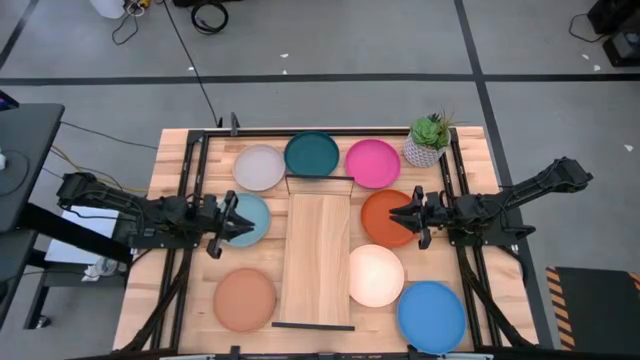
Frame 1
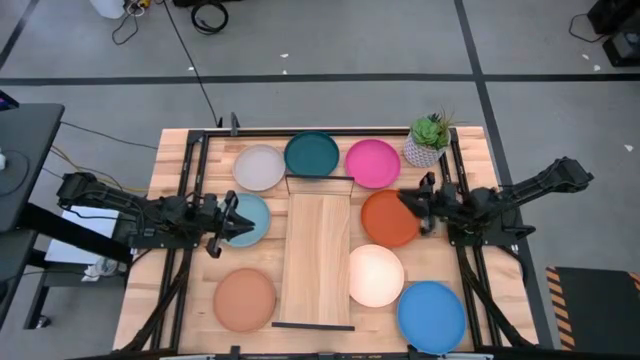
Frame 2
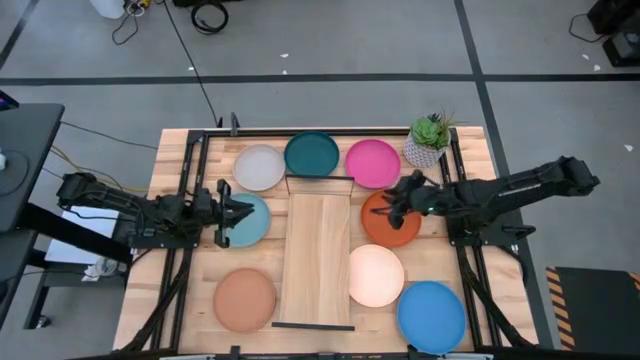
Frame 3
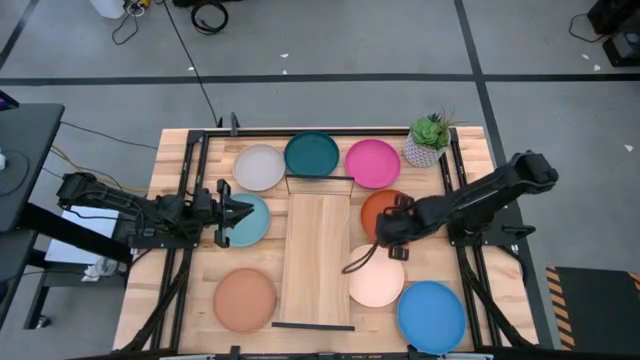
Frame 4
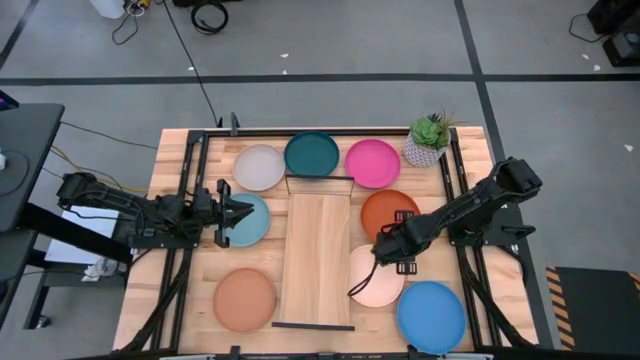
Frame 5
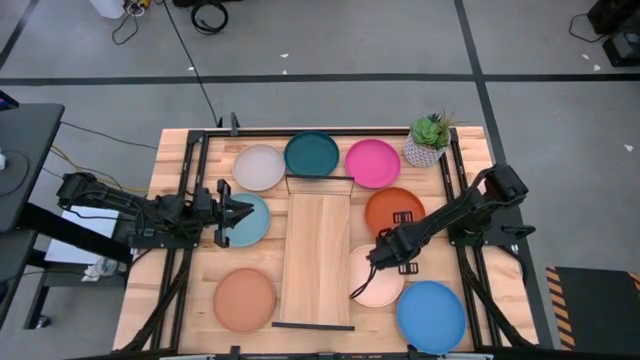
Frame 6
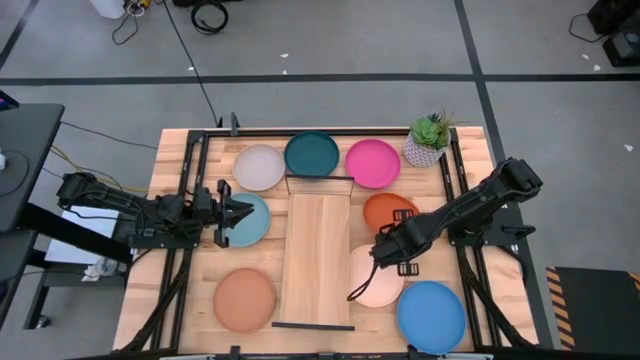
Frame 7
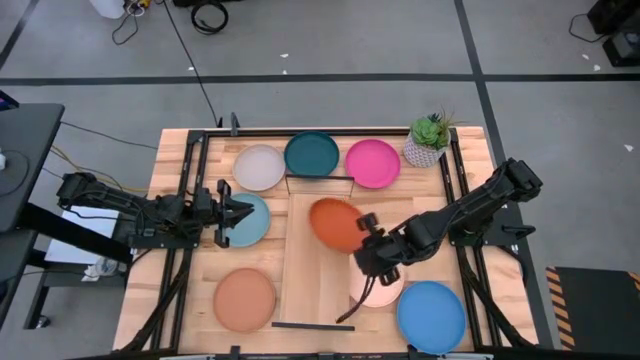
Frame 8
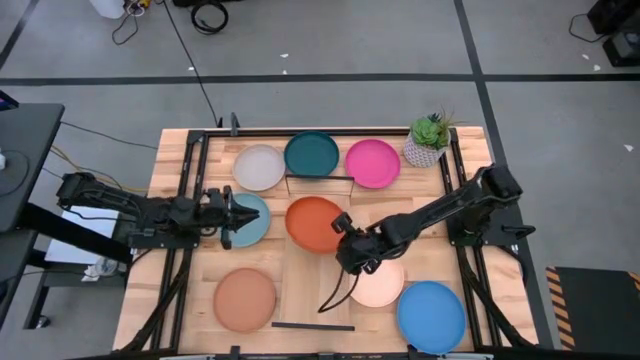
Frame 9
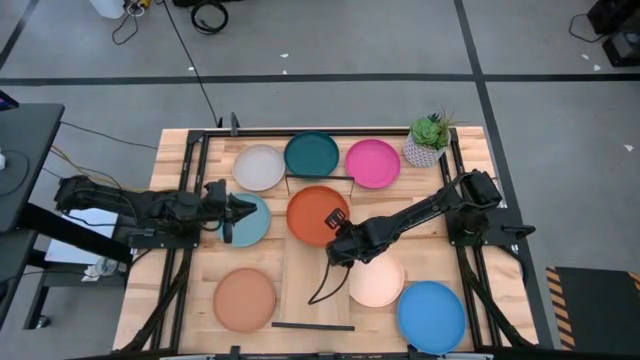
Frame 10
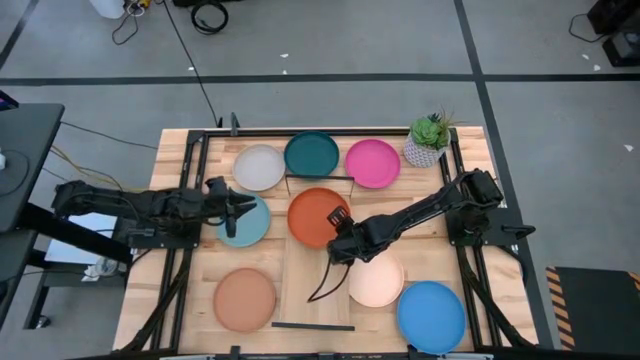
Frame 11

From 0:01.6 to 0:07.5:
Task: Place and stack plates onto a shelf
Put the orange plate on the shelf

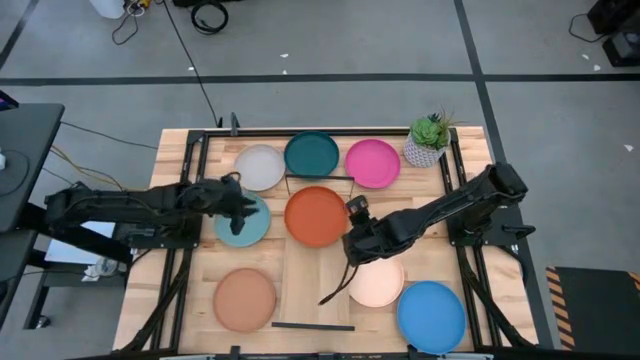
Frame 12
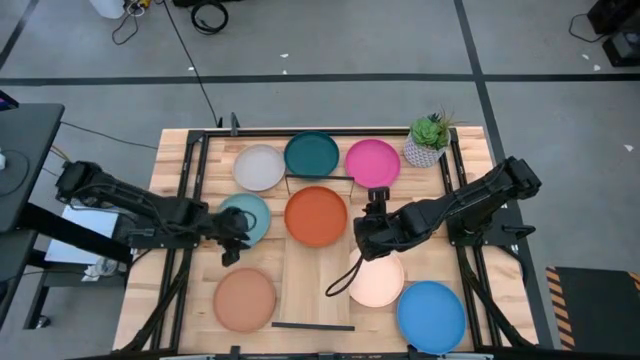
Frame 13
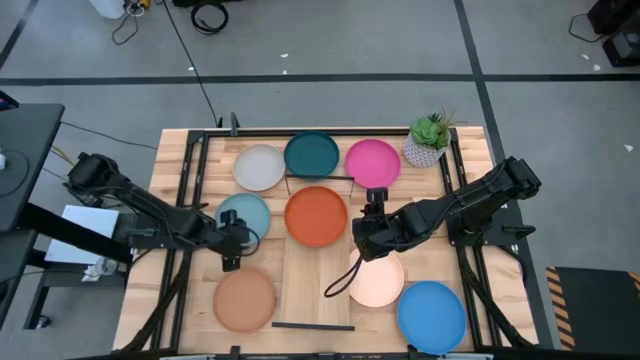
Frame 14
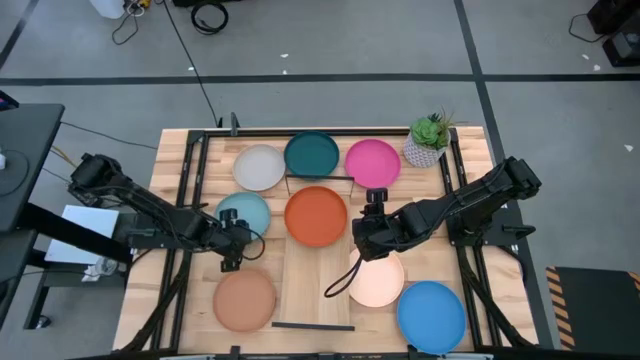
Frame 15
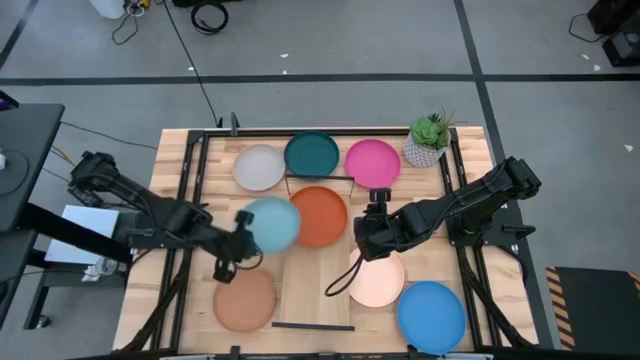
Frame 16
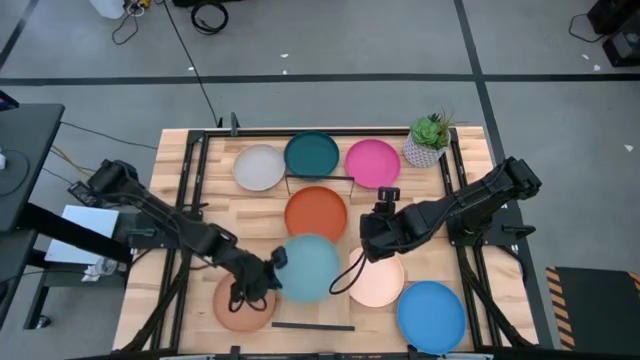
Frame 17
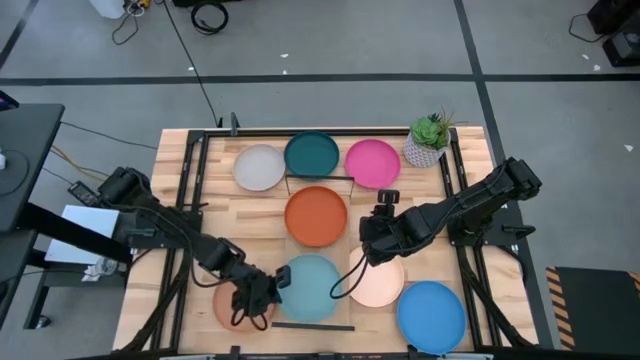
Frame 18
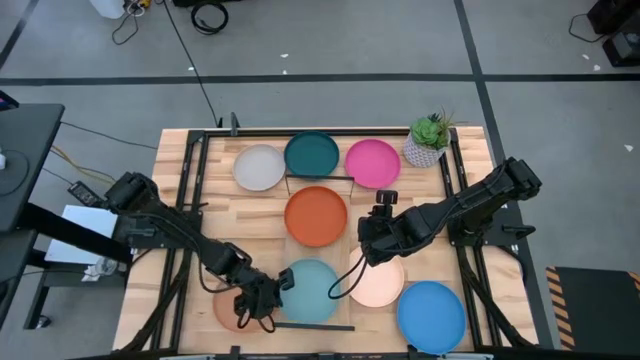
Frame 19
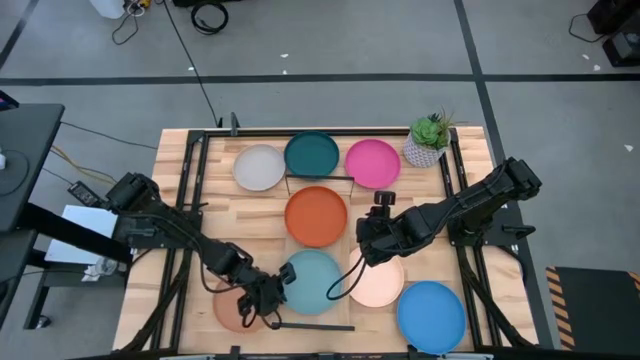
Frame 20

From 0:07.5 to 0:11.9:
Put the light blue plate on the shelf

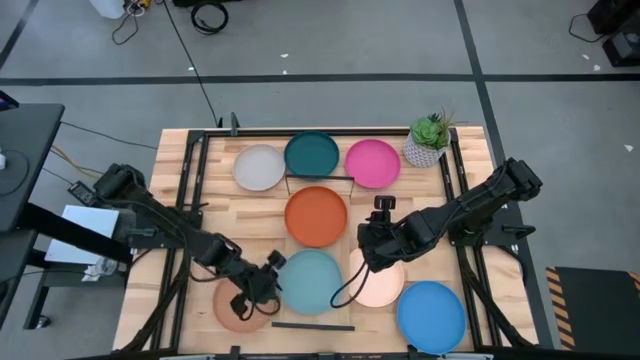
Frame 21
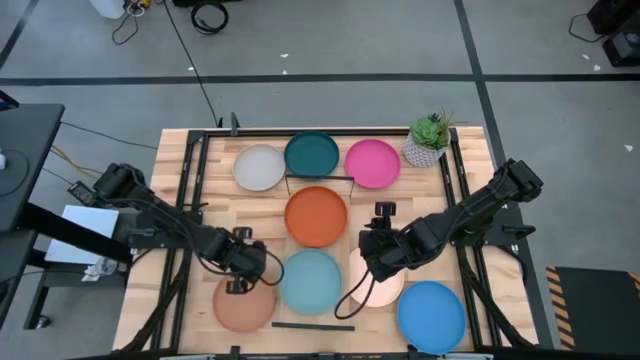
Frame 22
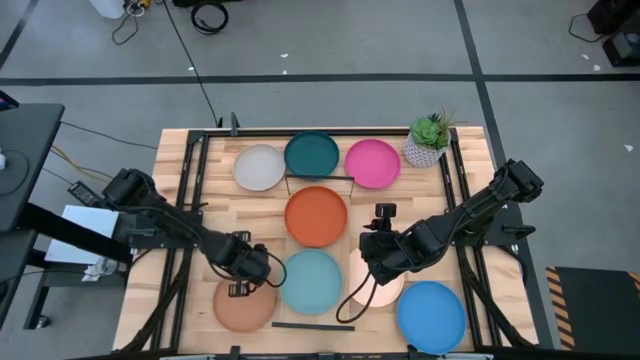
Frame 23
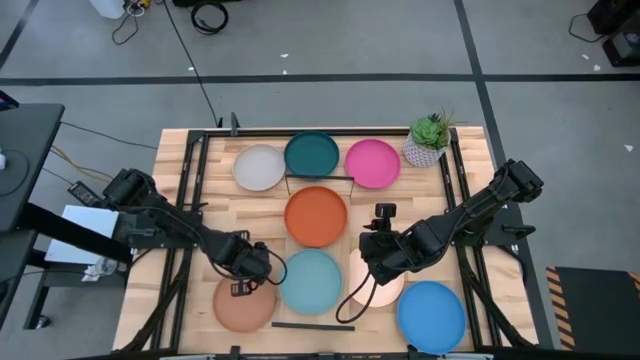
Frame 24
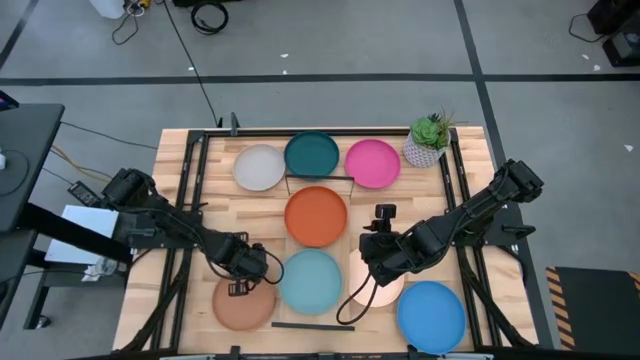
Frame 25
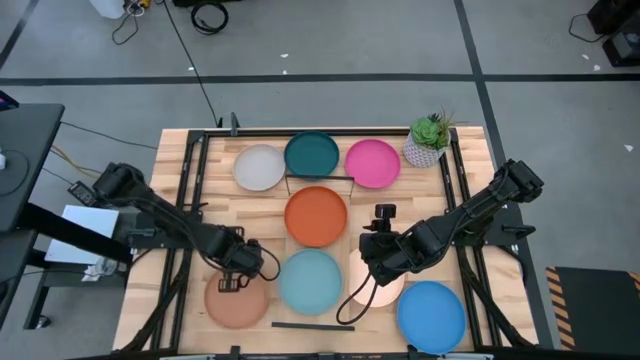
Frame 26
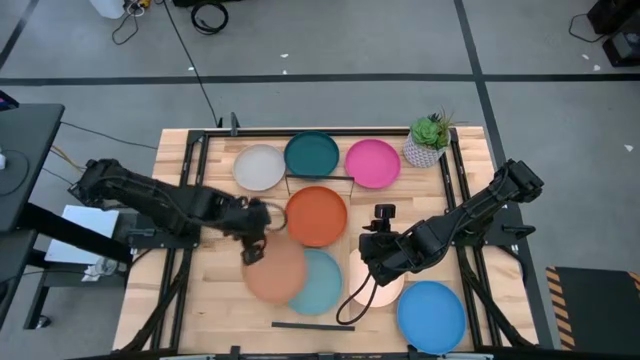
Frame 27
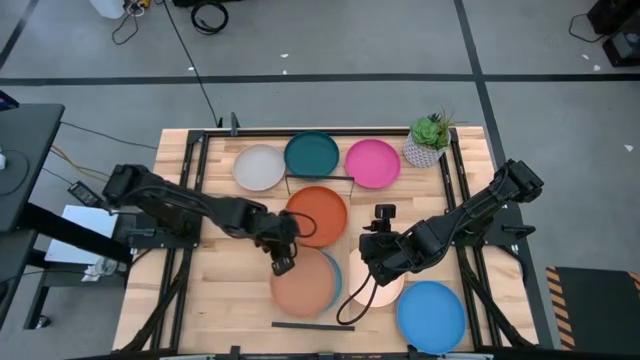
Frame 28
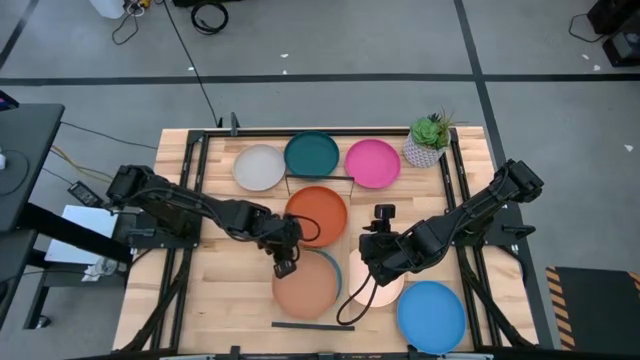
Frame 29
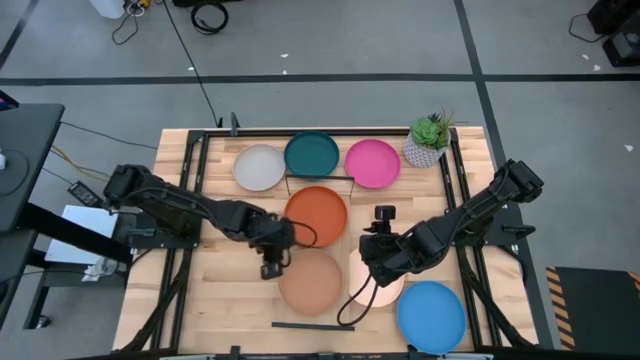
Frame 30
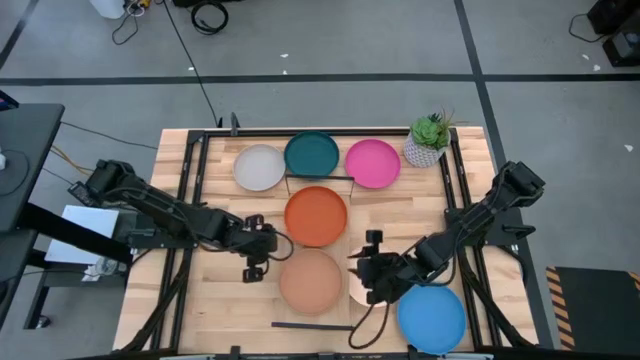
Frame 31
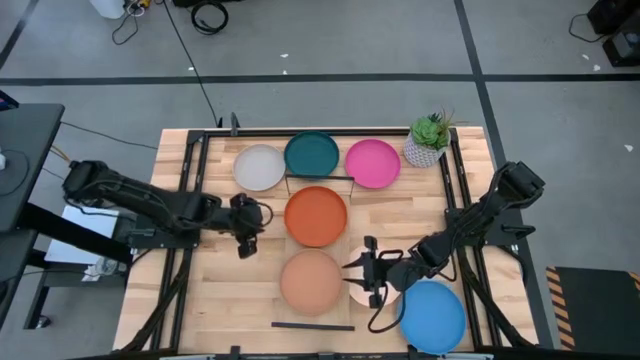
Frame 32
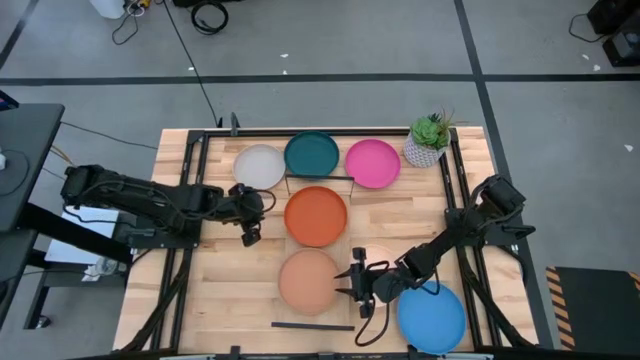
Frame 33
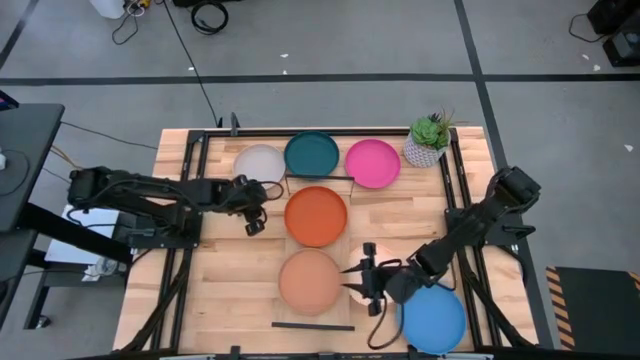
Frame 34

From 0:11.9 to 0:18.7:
Stack the brown plate on top of the light blue plate on the shelf

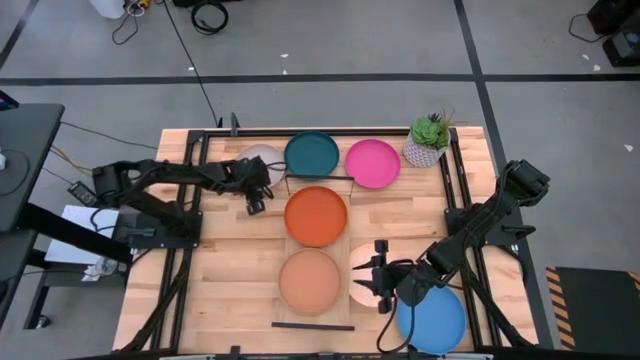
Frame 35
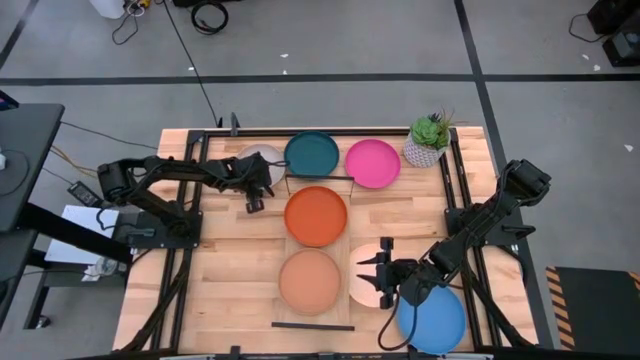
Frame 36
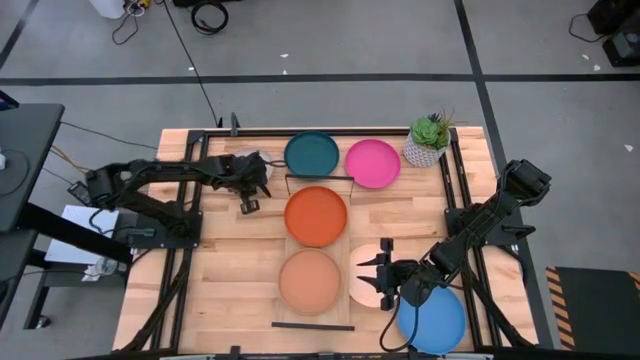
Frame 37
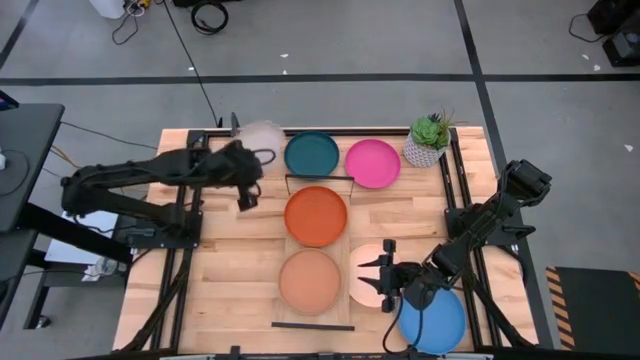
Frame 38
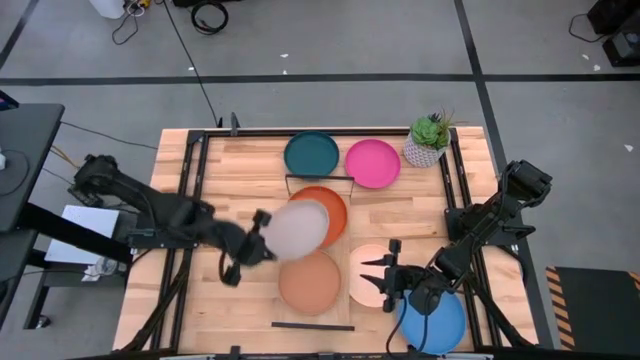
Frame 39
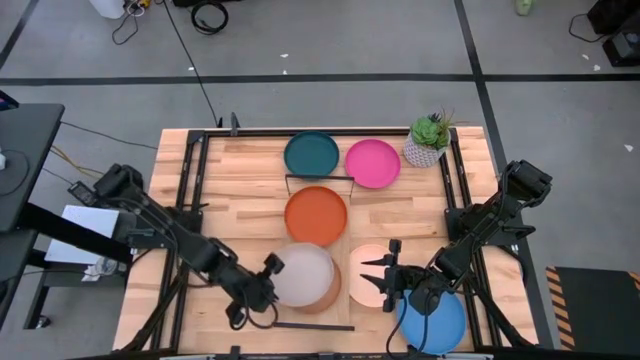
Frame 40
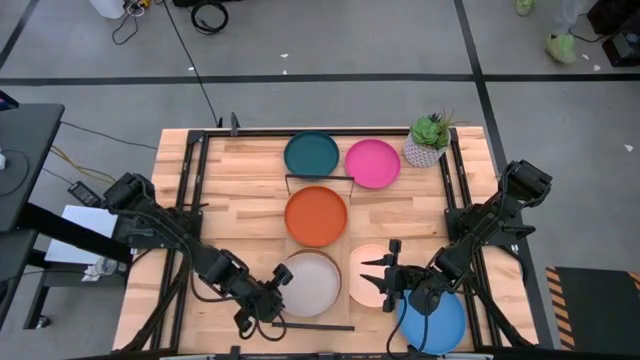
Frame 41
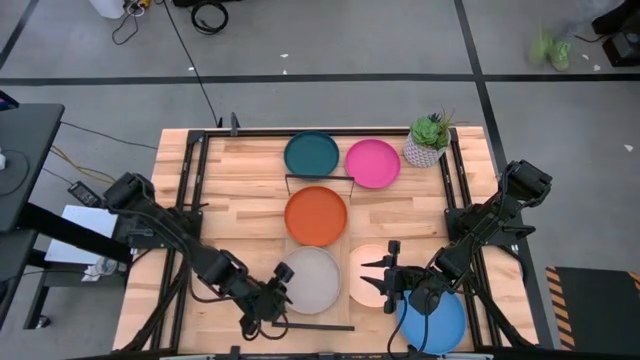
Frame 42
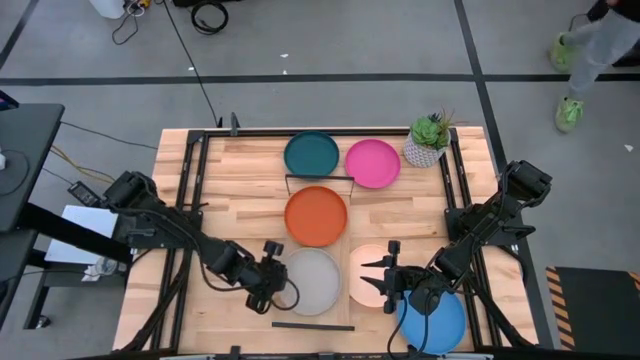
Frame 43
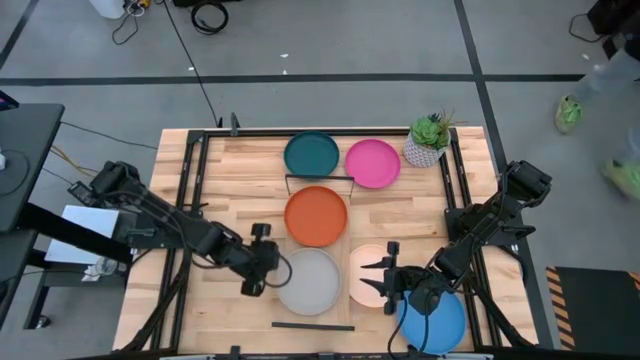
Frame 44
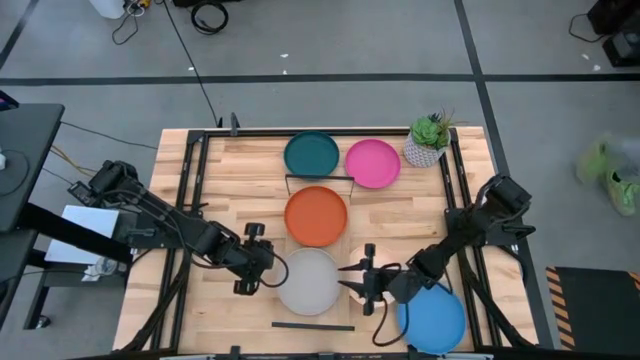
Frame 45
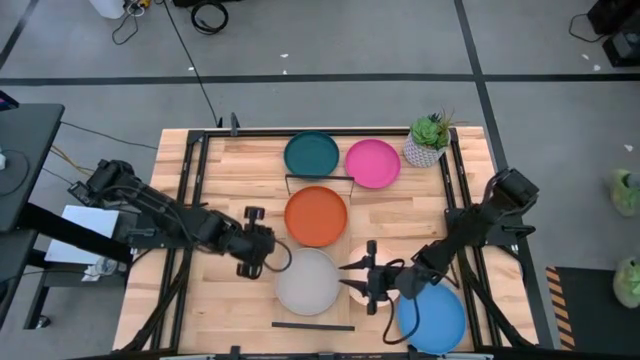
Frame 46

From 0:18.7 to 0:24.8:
Stack the gray plate on top of the brown plate on the shelf
